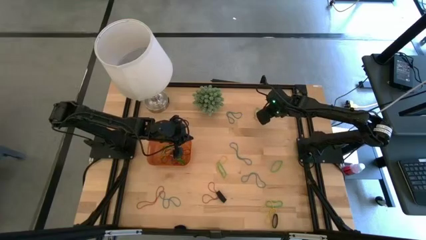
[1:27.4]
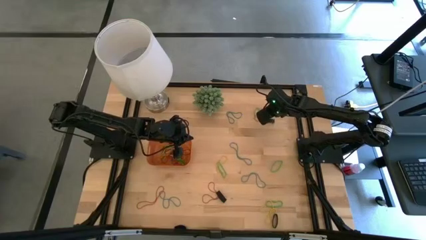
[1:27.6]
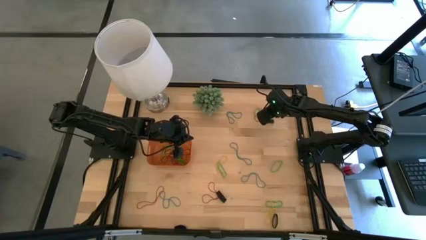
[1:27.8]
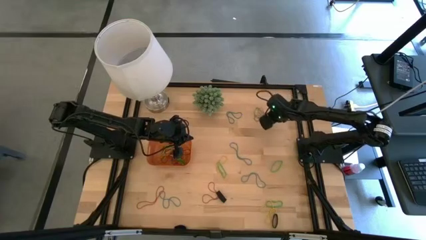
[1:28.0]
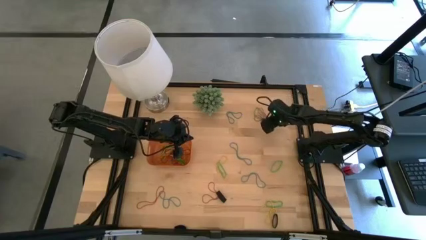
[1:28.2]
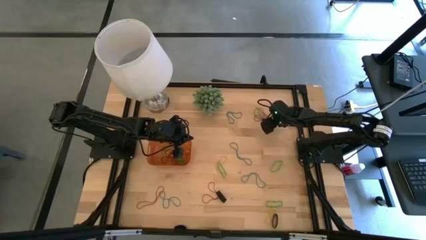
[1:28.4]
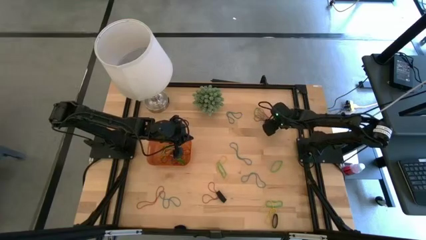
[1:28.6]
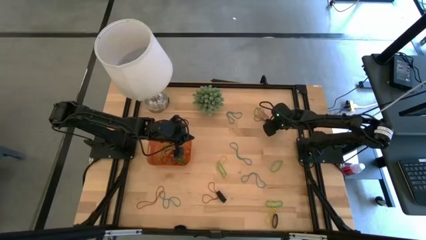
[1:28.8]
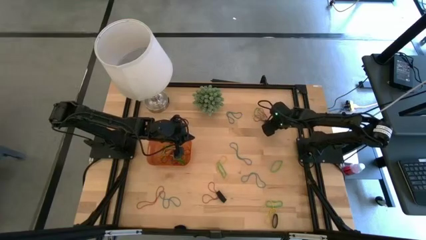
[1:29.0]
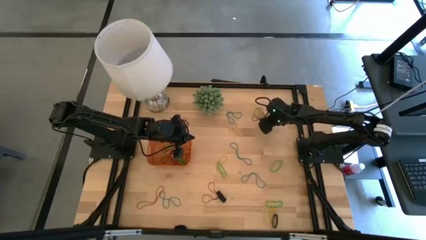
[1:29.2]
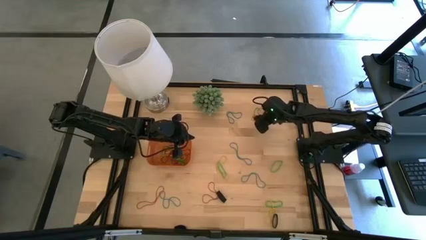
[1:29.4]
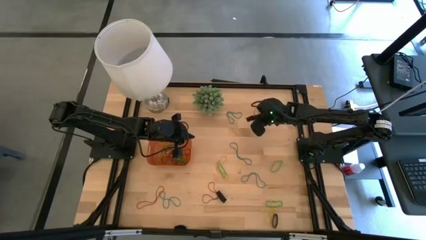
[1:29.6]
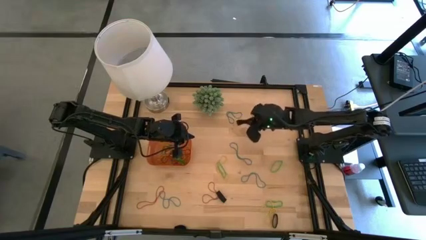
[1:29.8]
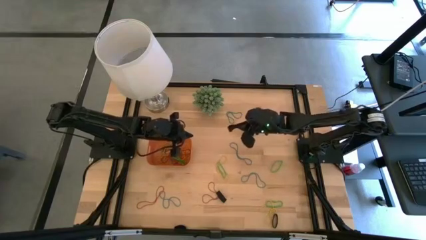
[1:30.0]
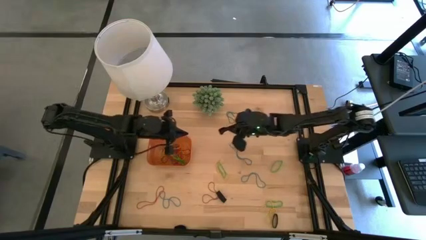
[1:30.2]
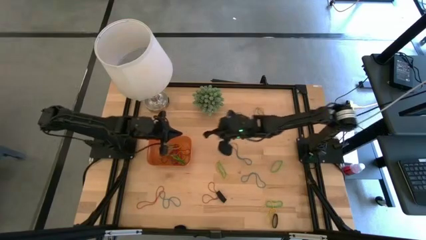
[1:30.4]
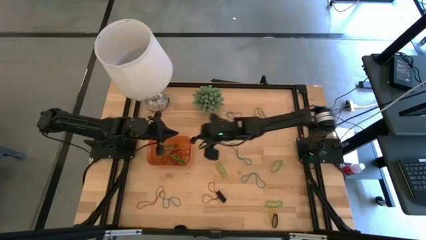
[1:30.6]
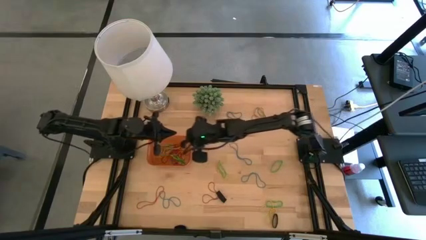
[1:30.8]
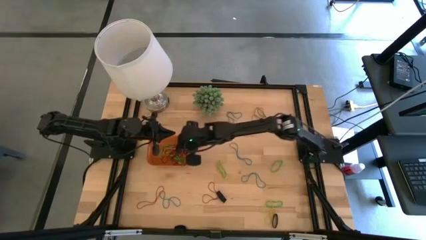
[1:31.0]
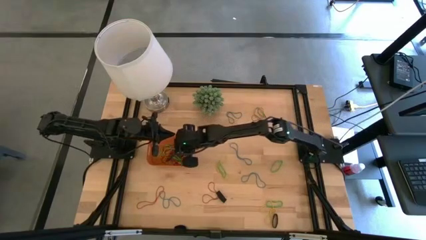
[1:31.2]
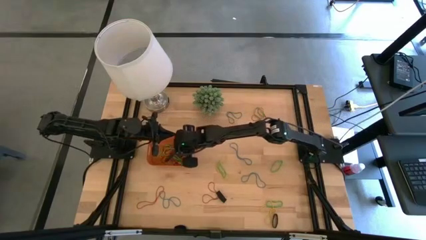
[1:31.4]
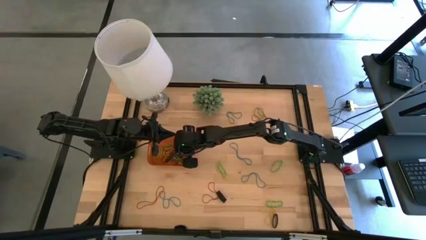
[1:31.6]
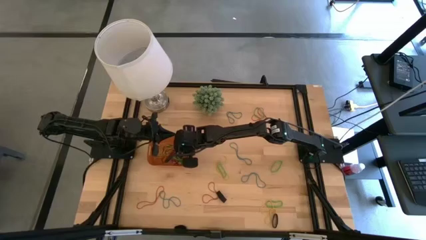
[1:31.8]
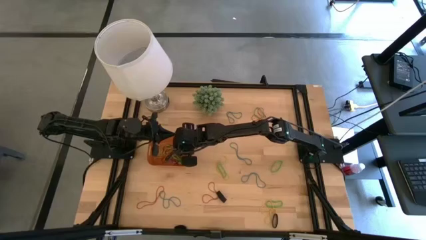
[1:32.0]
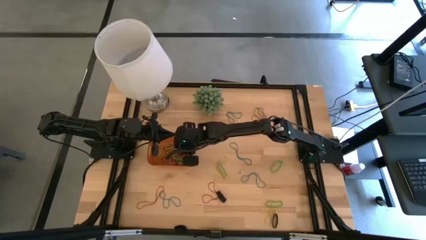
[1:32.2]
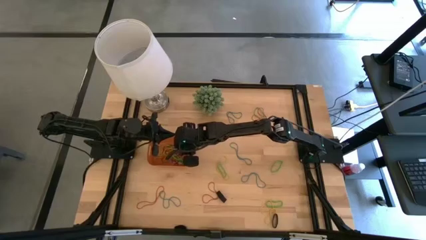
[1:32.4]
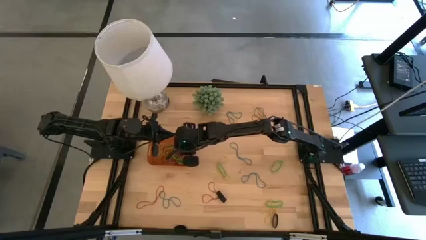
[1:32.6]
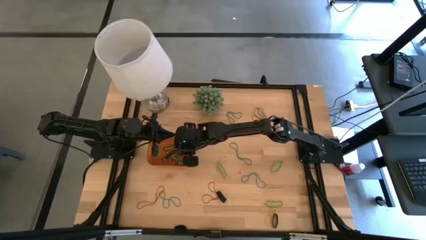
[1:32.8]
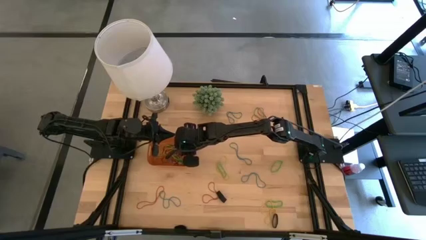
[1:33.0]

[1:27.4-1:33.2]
Task: Pick and place rubber bands into bin
Put the black rubber band into the orange bin

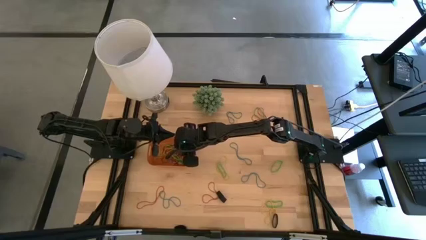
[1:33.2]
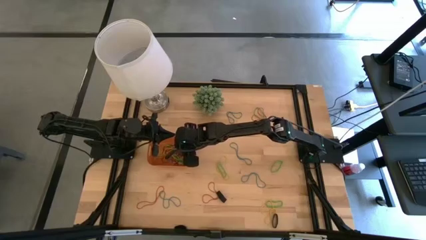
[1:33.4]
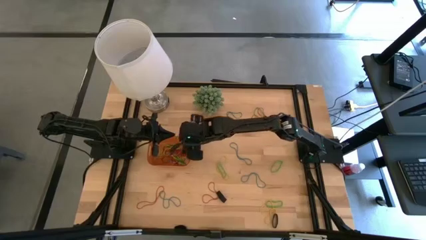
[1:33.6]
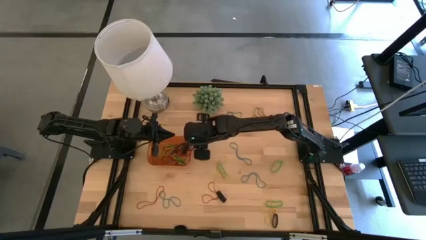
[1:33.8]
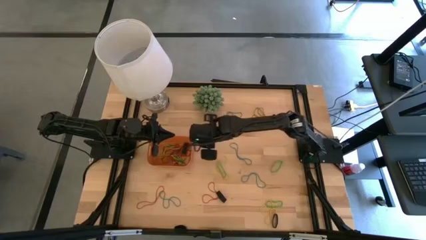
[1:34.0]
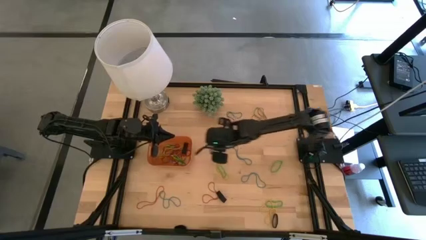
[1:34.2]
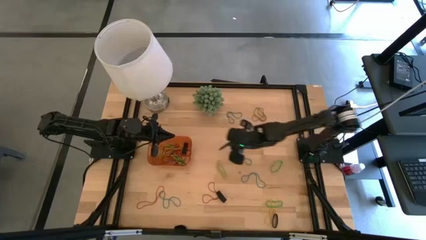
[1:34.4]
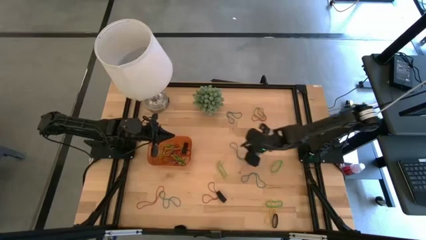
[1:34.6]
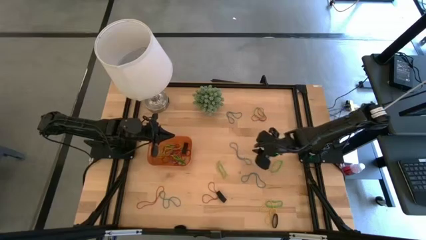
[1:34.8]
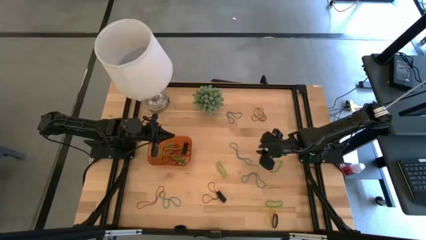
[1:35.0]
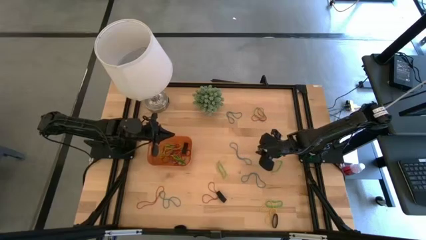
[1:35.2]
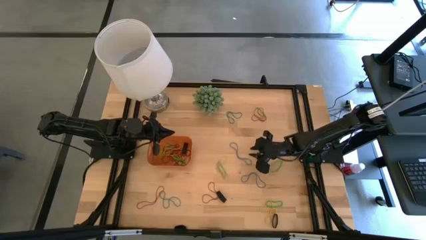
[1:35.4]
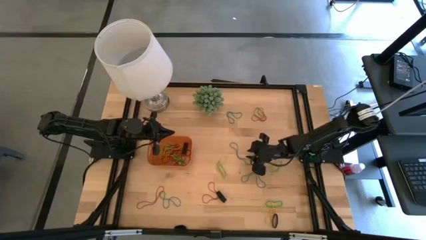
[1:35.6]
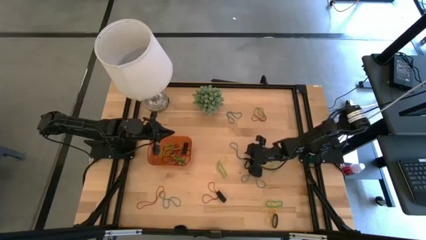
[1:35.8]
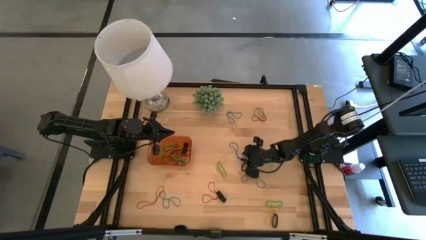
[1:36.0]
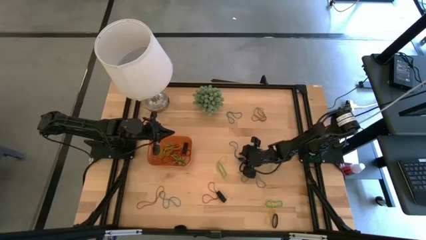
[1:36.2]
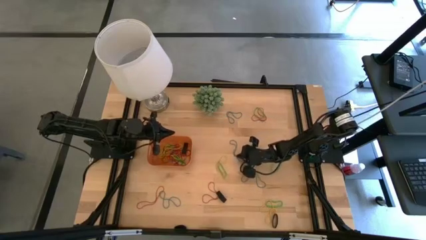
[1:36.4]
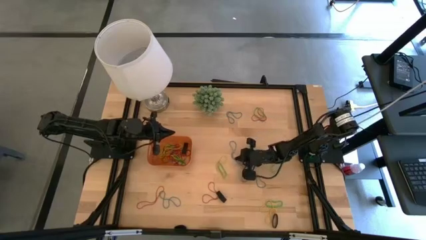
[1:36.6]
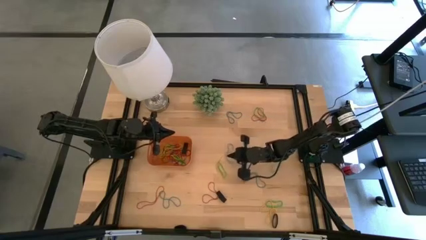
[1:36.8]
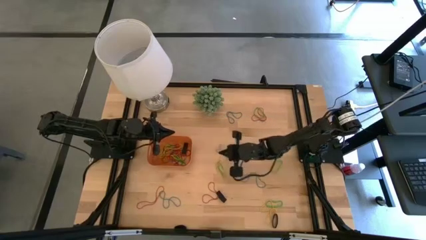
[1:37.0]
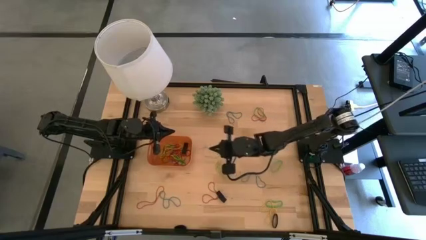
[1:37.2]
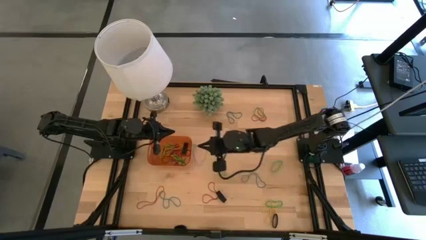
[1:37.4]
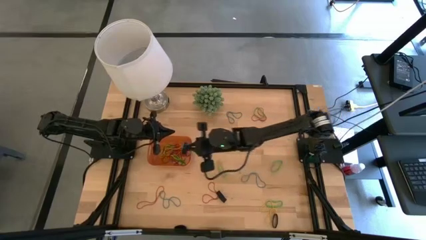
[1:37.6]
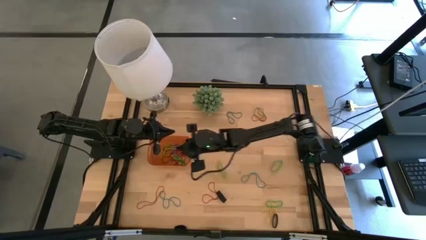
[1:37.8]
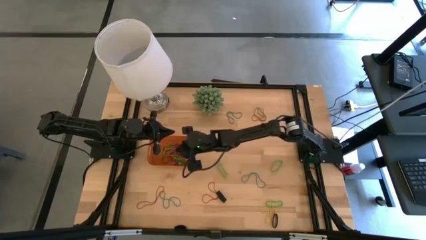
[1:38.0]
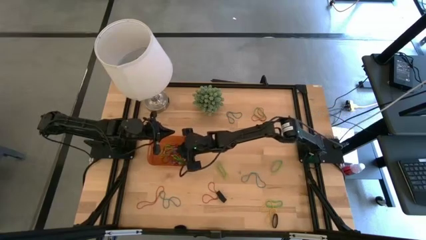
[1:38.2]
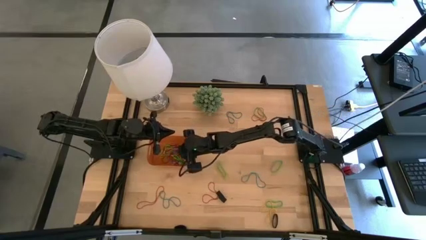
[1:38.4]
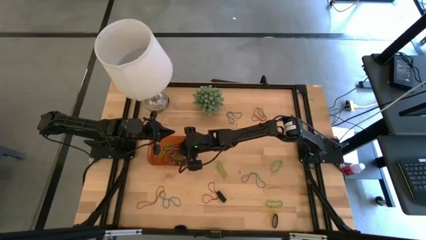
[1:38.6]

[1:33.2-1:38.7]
Put the blue rubber band into the orange bin

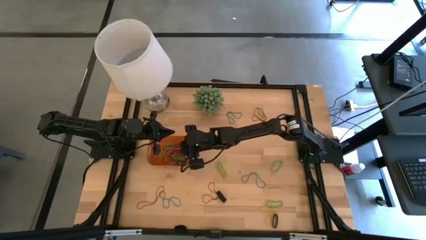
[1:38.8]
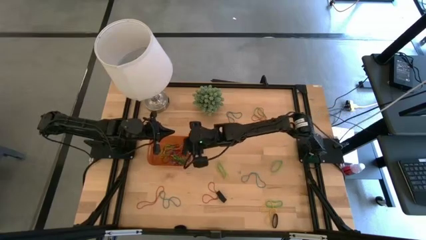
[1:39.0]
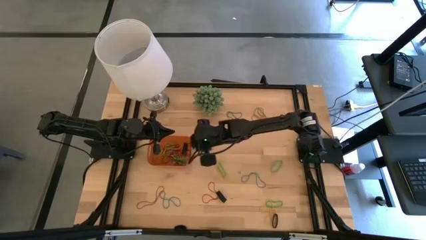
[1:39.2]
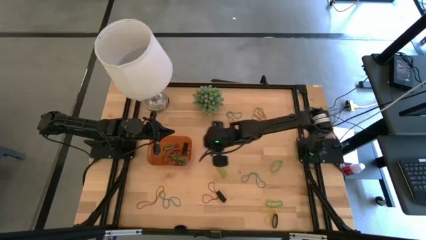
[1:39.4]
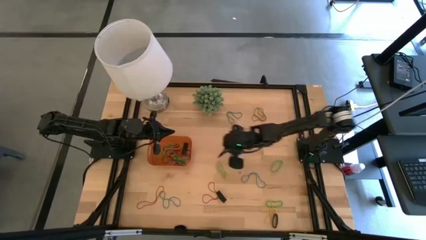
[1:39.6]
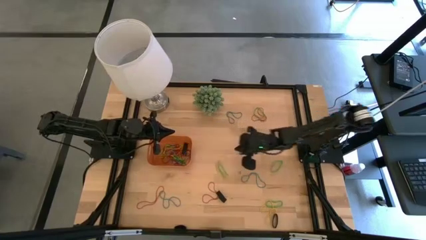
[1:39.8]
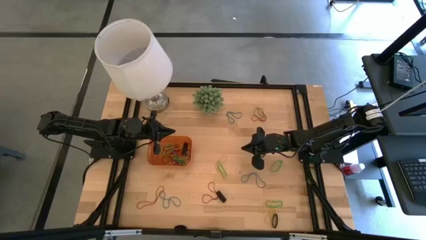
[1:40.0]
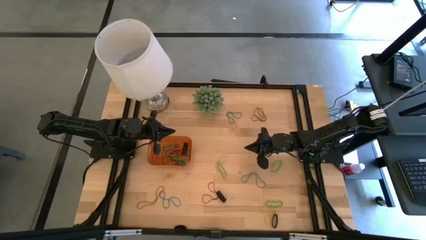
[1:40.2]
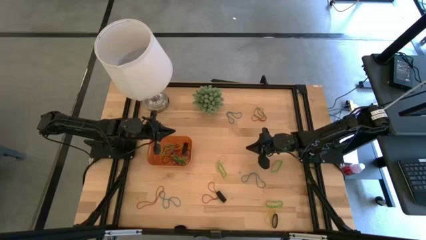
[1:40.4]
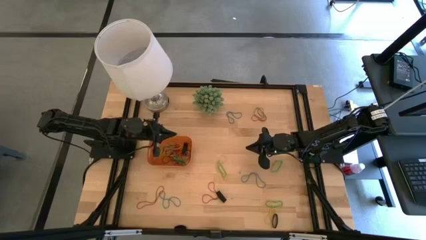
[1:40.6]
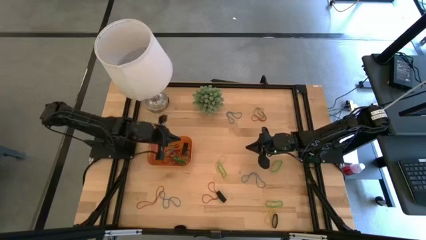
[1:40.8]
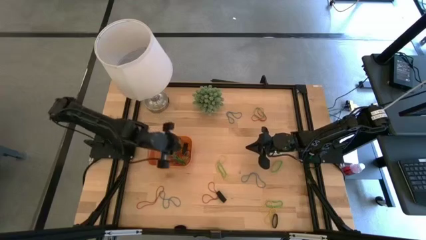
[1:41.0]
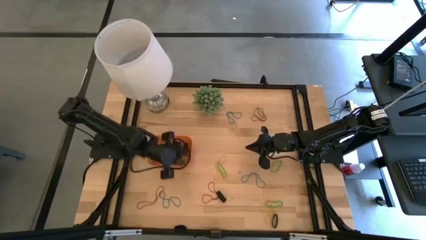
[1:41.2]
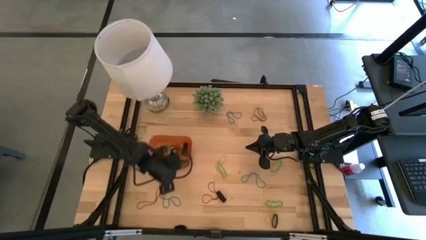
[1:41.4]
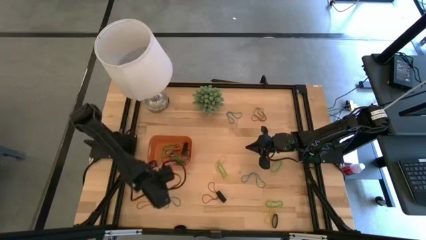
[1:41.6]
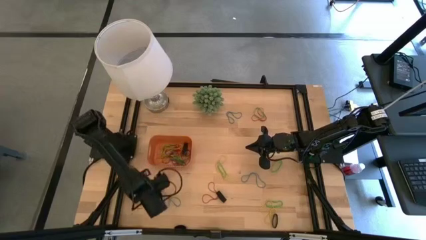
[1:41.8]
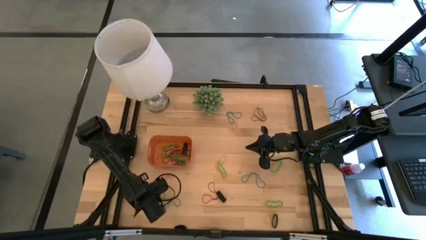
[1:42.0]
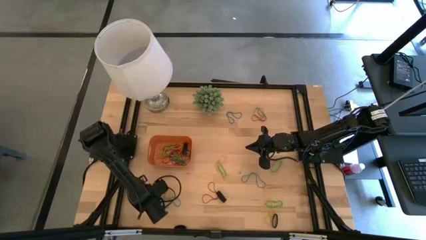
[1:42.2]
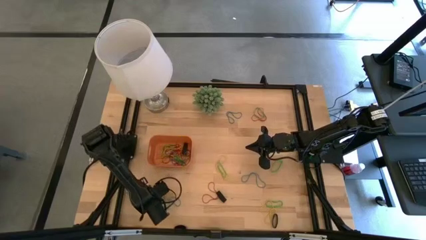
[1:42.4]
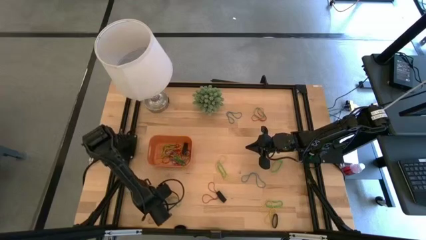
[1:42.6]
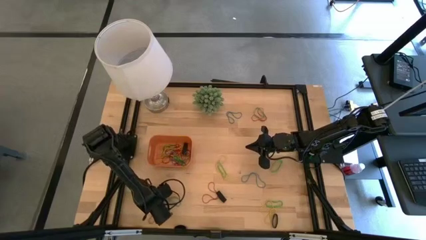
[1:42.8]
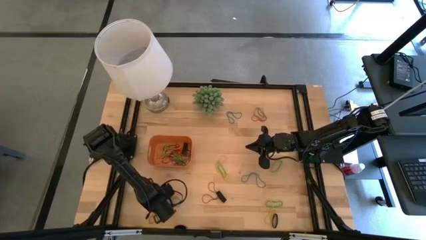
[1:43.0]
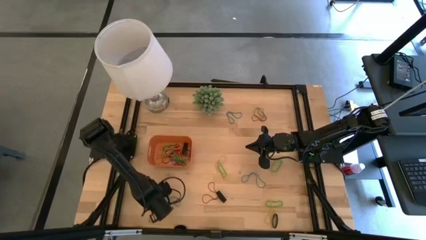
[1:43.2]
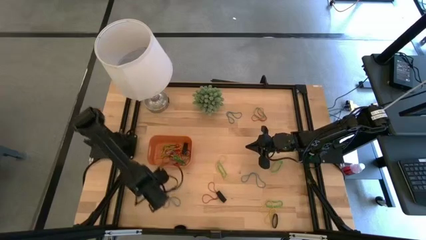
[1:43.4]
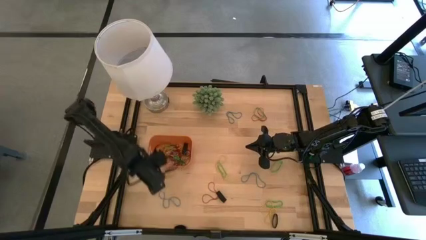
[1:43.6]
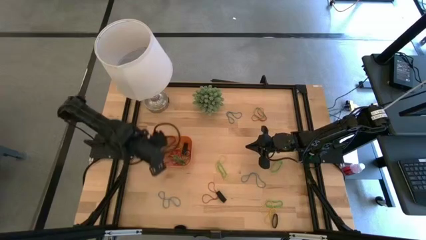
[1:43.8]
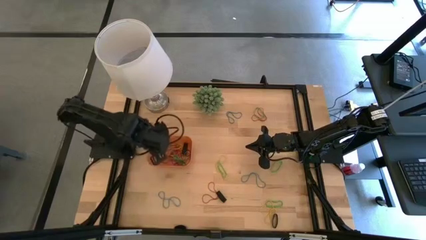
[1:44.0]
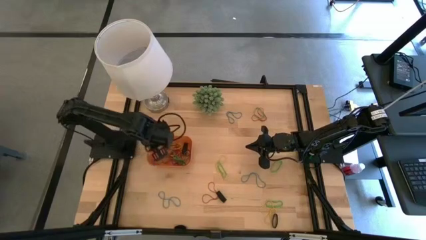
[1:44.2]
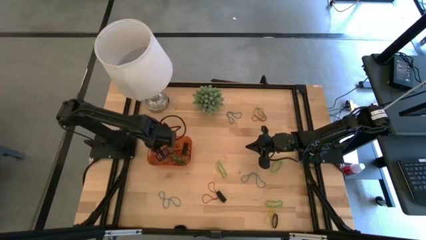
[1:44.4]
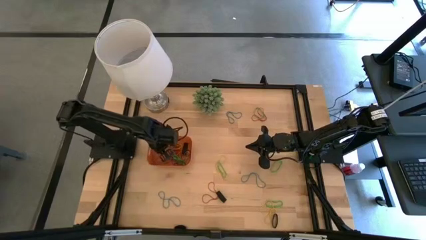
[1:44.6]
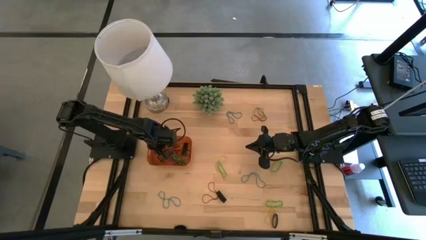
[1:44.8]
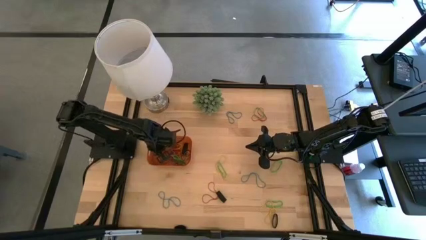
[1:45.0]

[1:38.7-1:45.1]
Put the red rubber band into the orange bin
